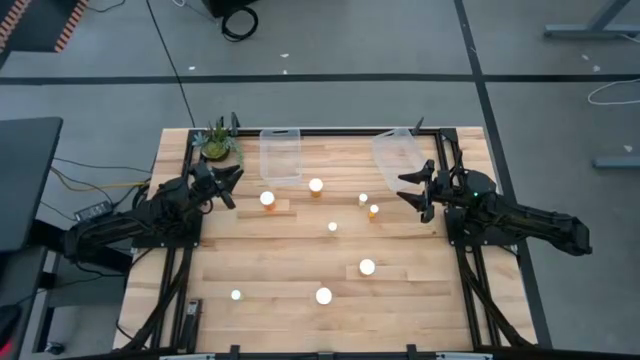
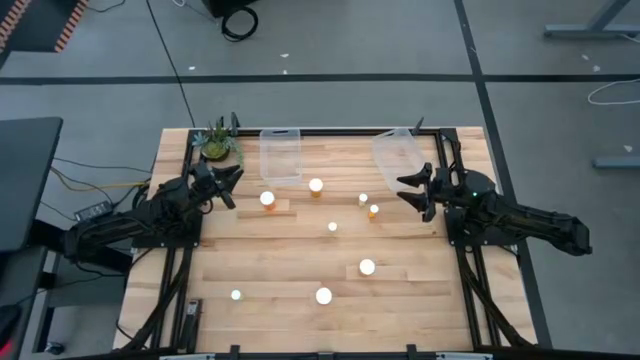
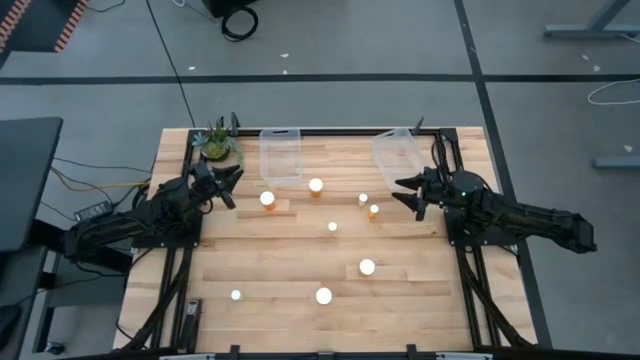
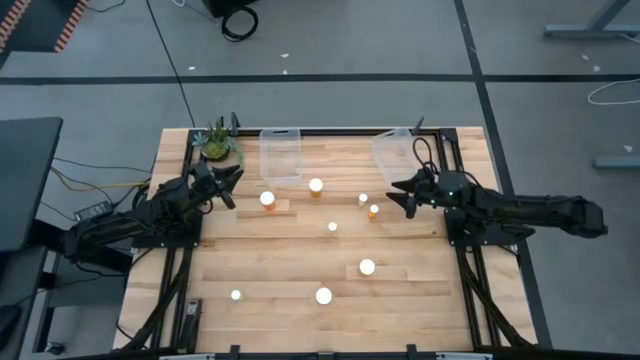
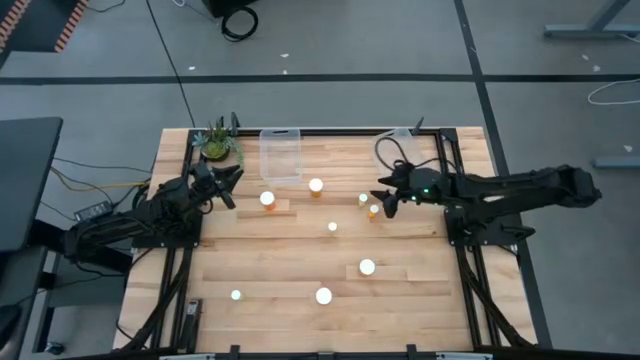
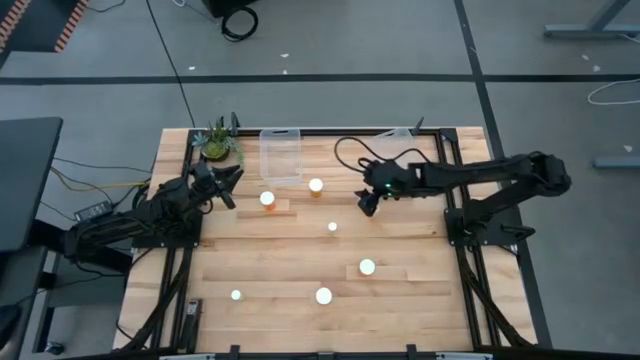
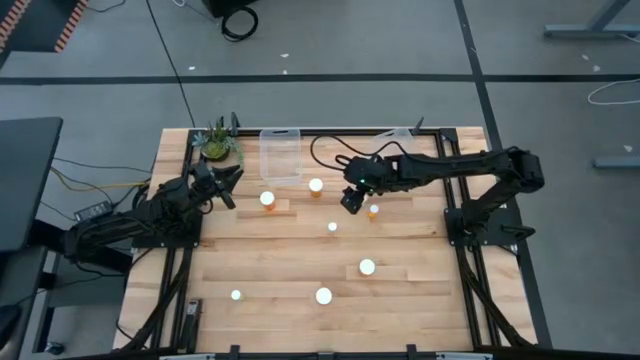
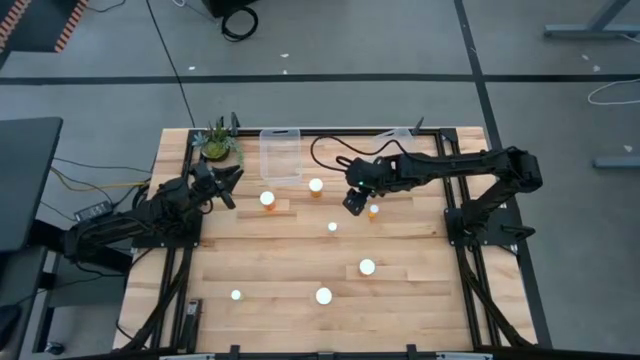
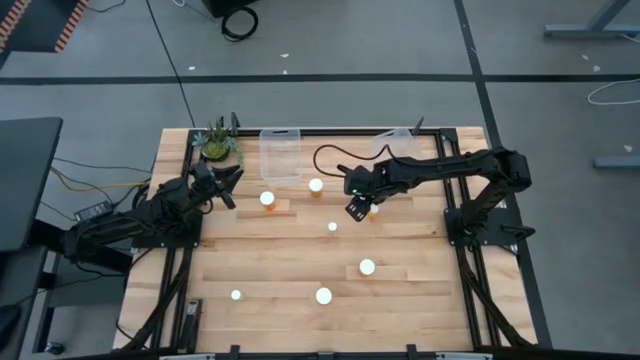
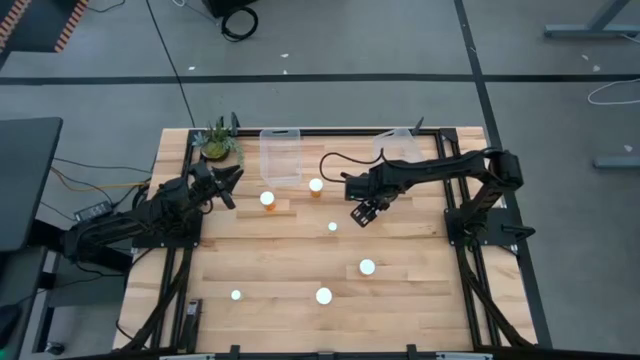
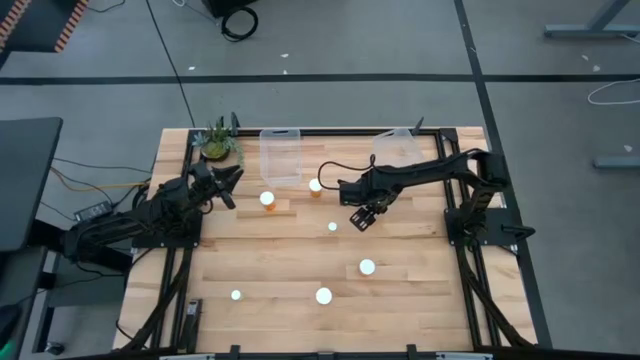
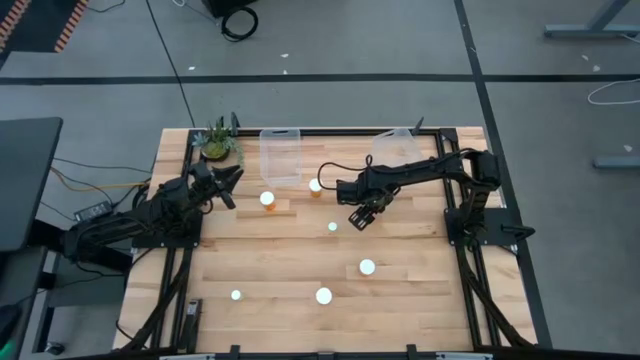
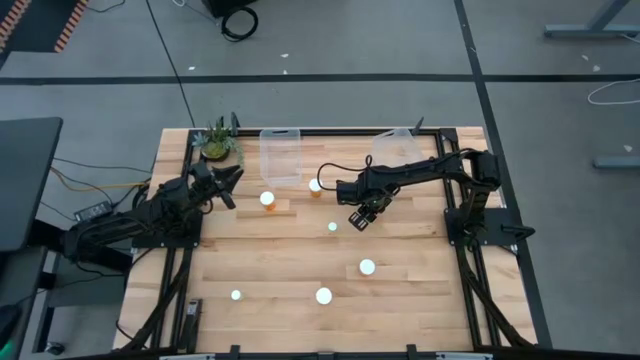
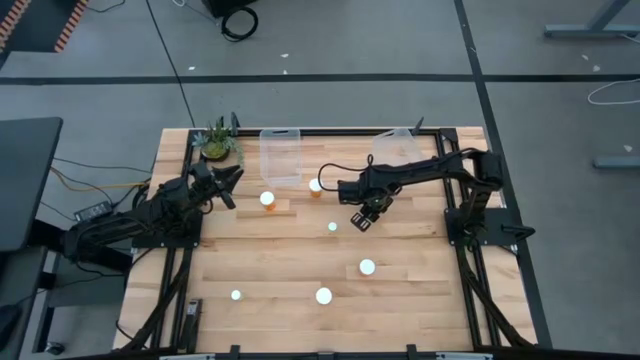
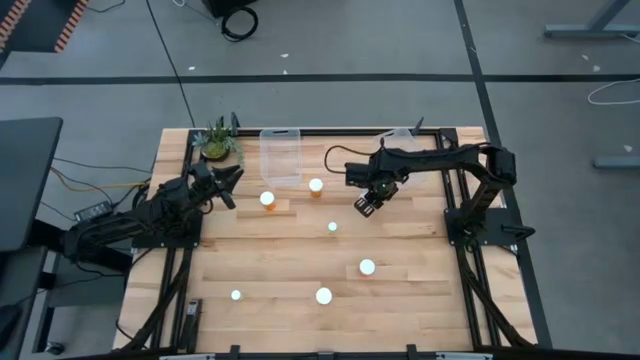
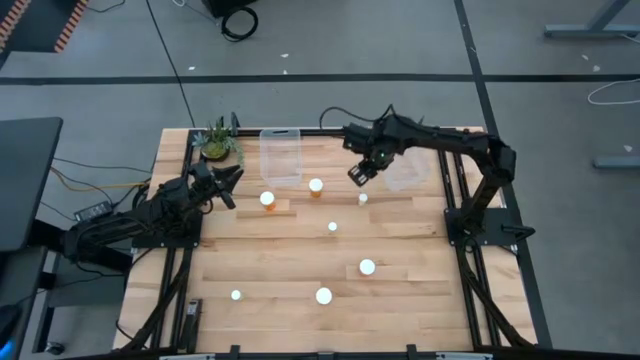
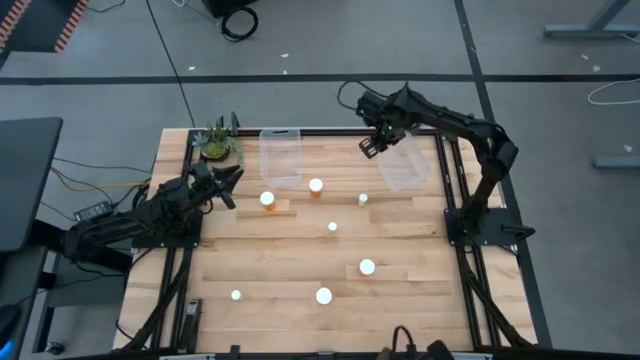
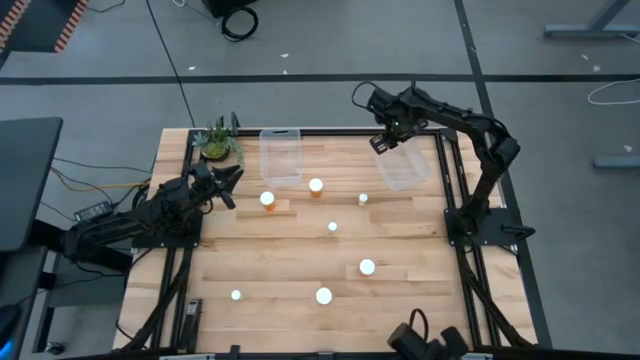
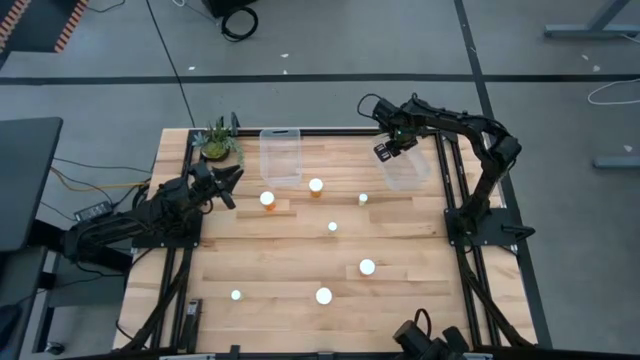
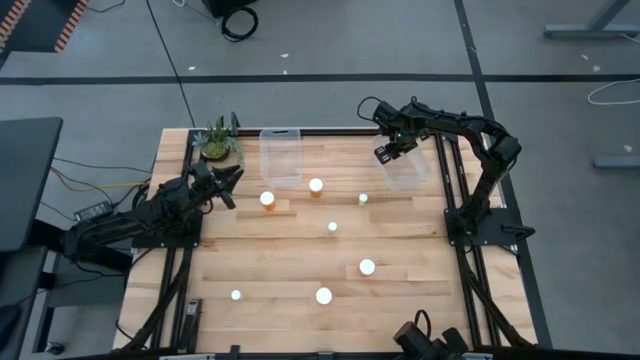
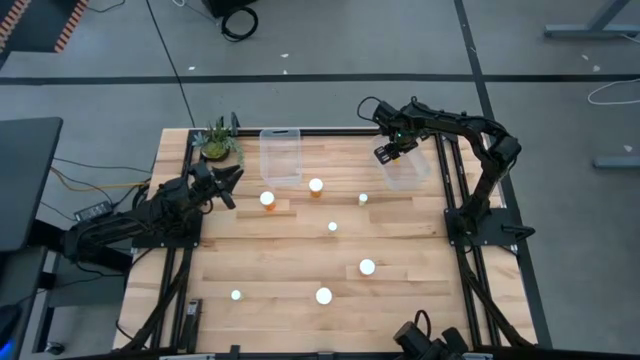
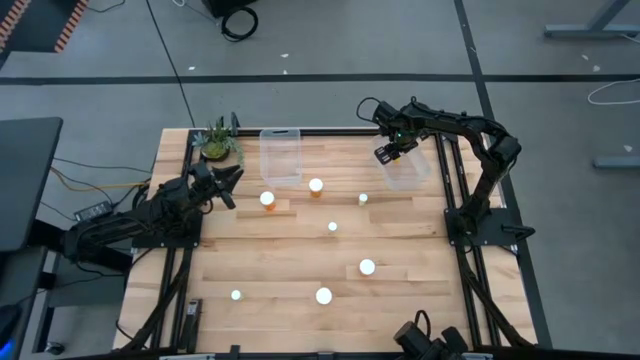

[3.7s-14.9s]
Task: Pick and place medicine bottles into bin by pill shape (circle, oval)
Put the small orange pill bottle into the right transparent bin

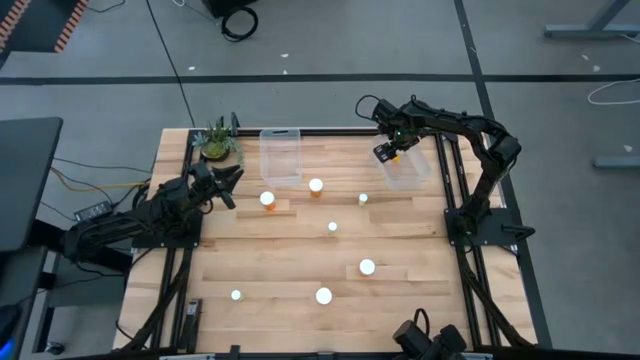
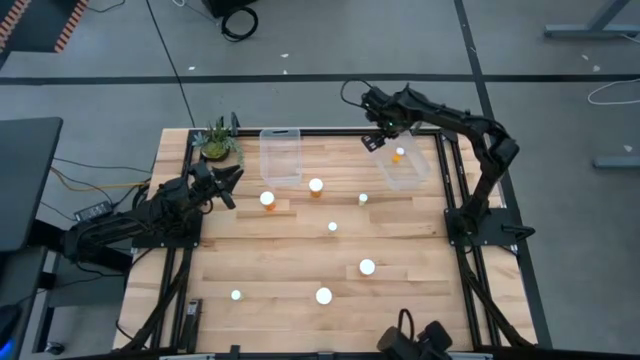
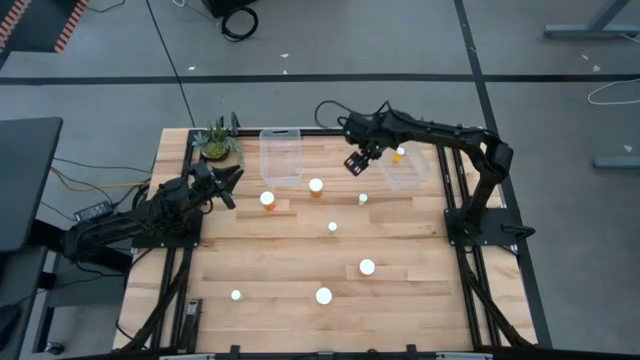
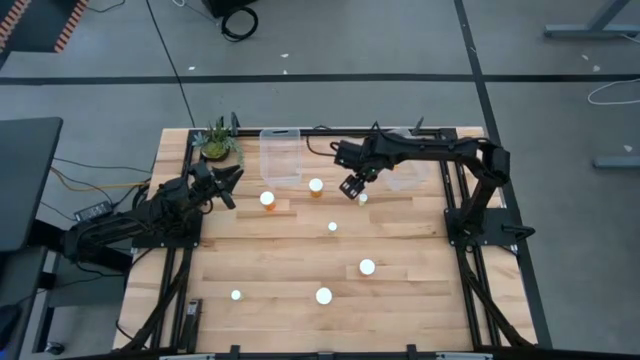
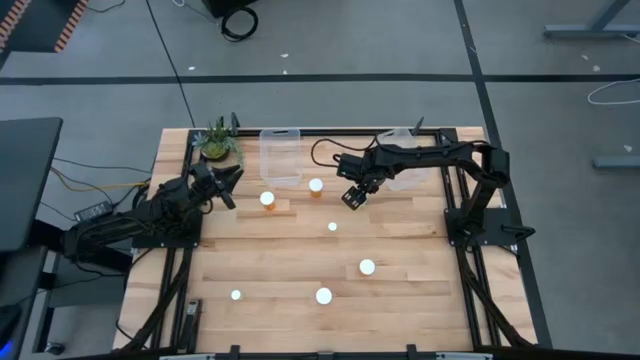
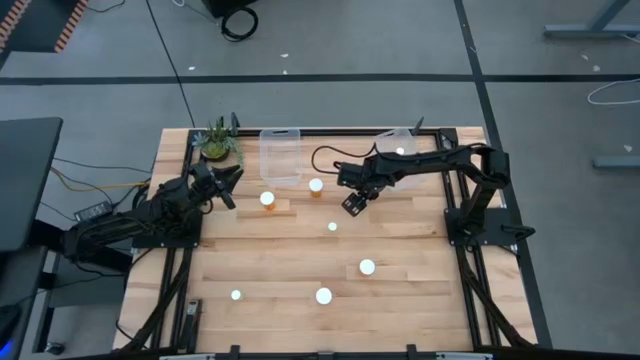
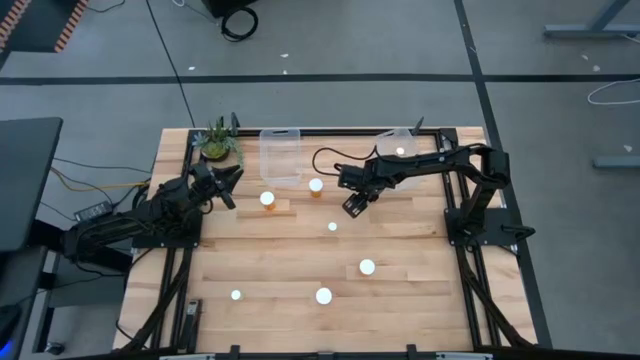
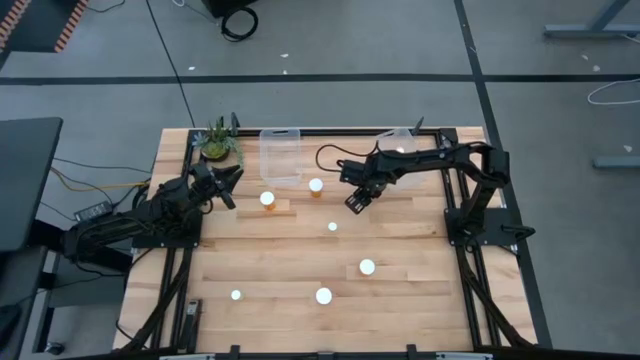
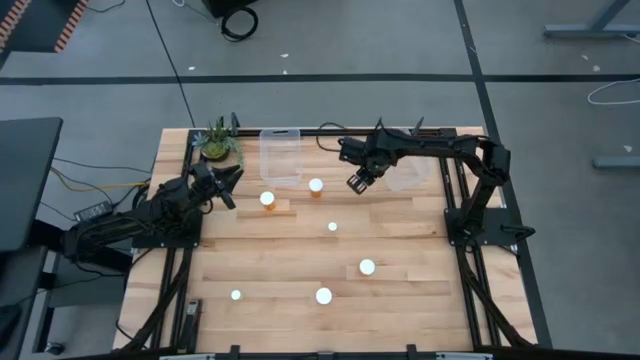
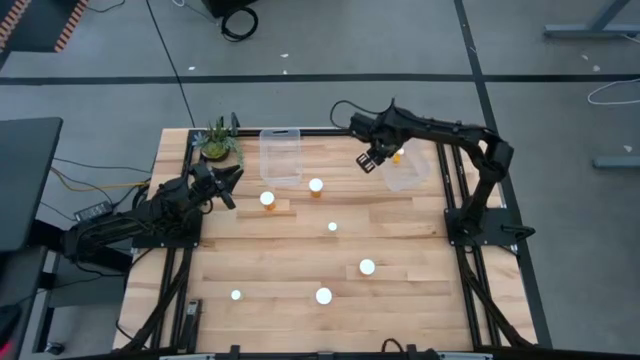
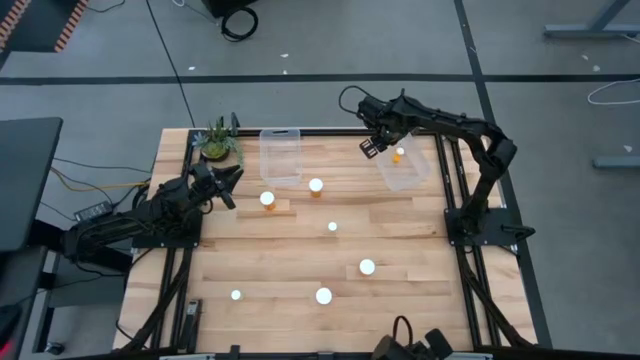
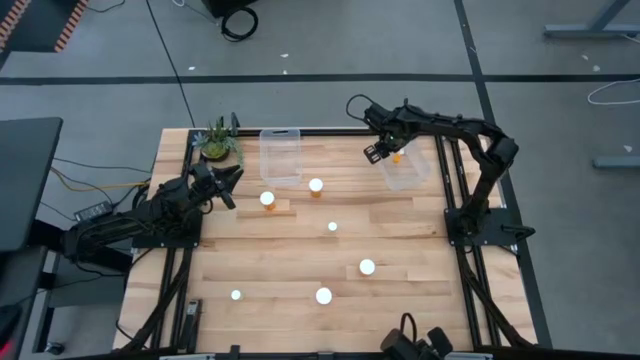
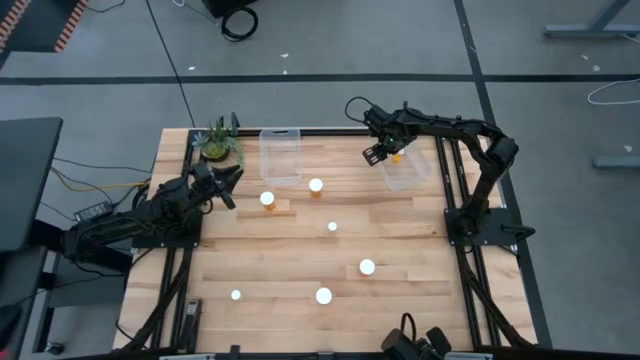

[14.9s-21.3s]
Put the small yellow pill bottle into the right transparent bin

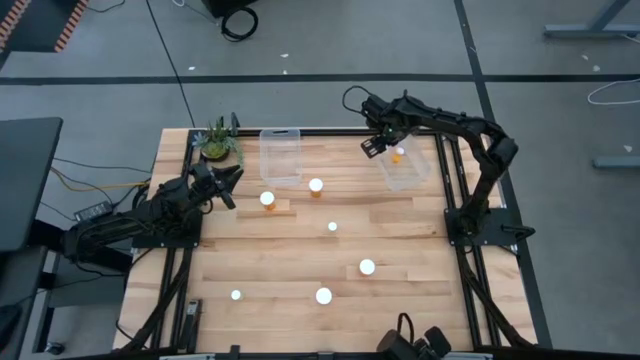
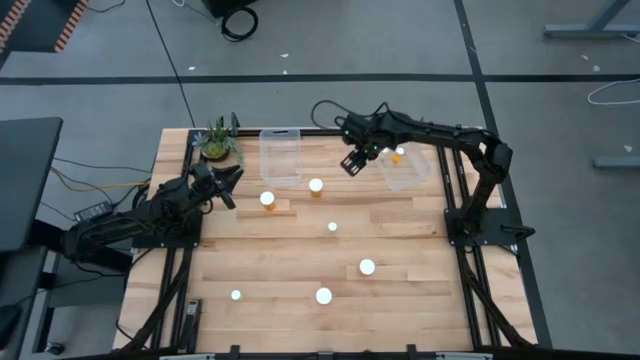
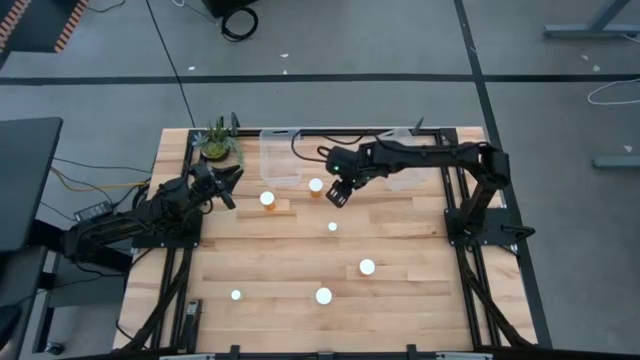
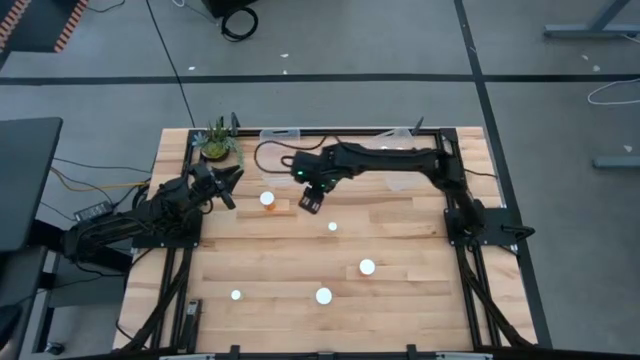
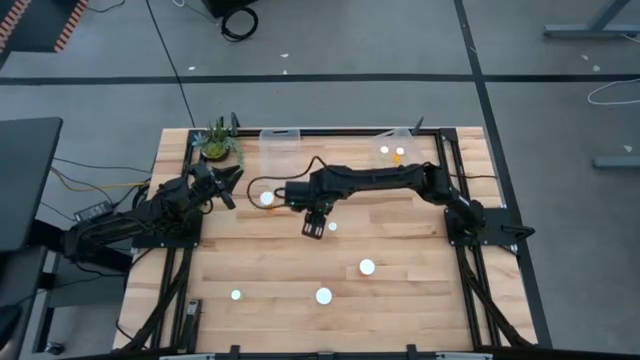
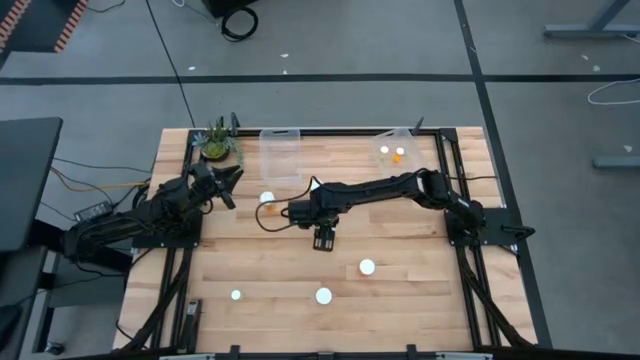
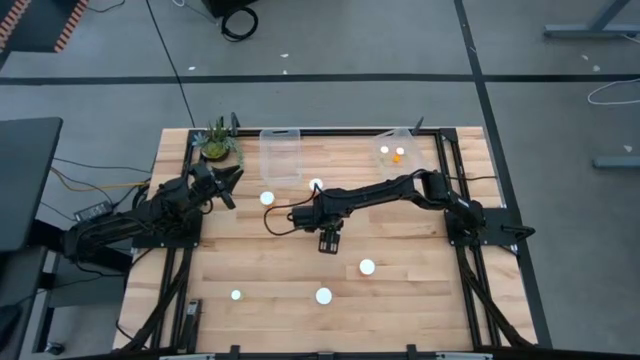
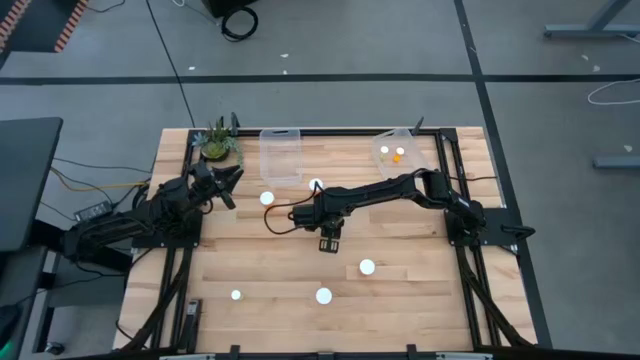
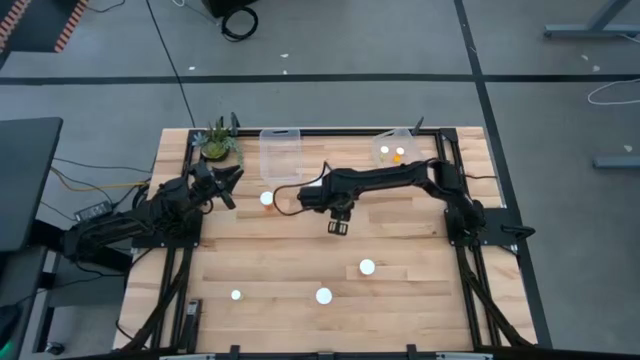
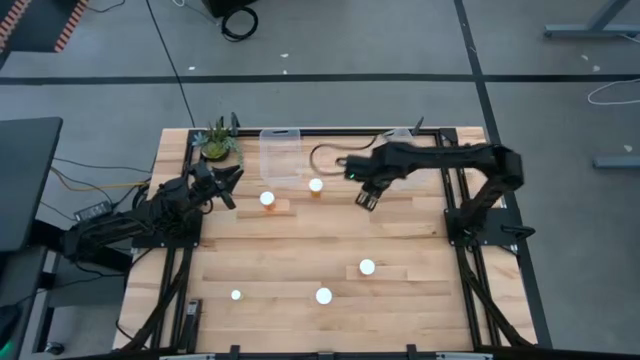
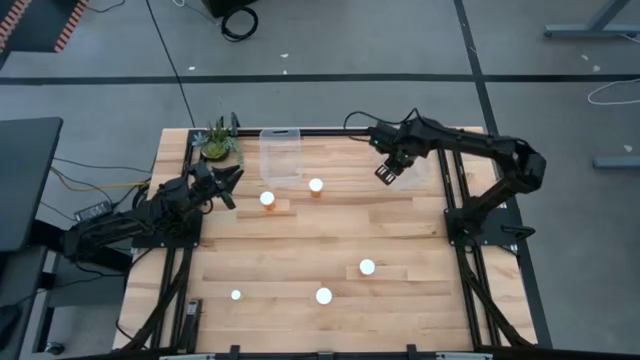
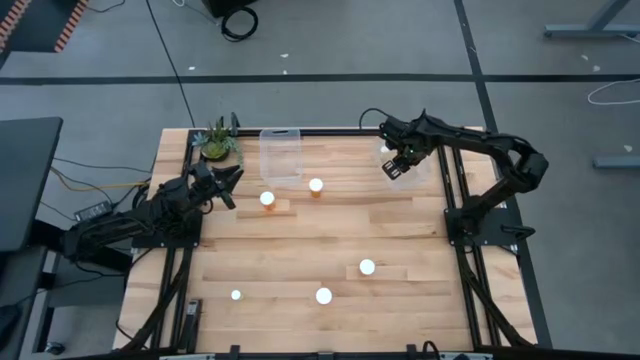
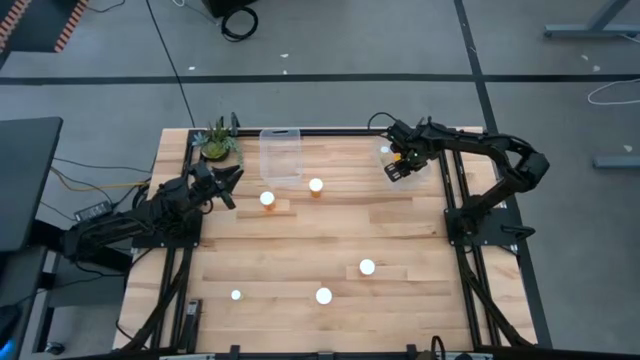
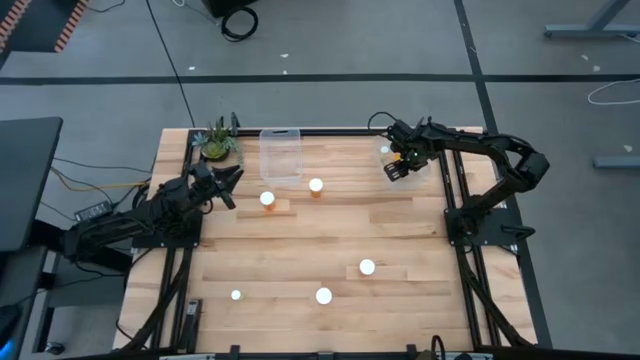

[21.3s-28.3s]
Put the small yellow pill bottle into the right transparent bin
